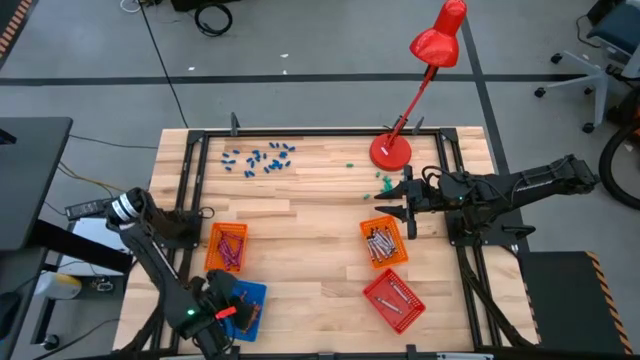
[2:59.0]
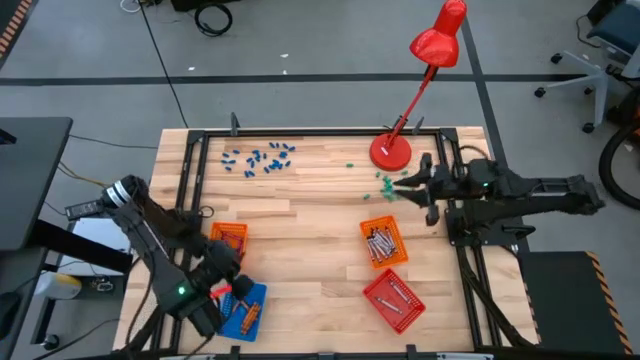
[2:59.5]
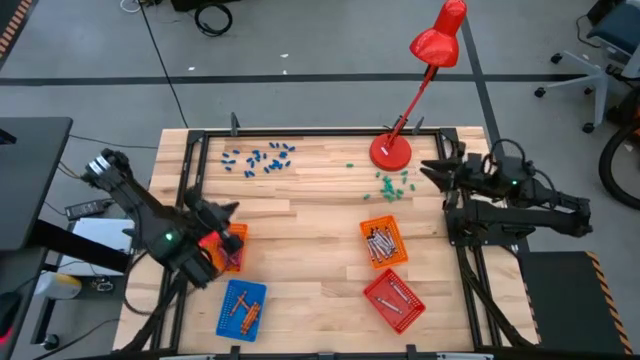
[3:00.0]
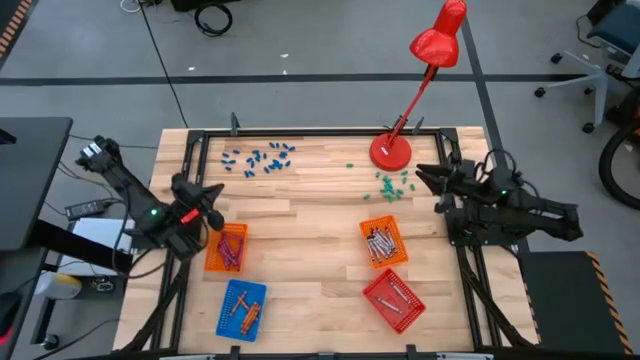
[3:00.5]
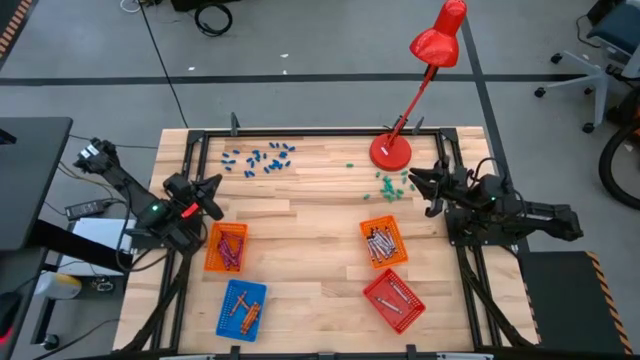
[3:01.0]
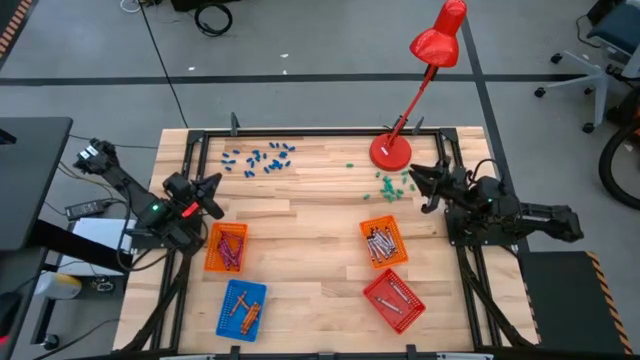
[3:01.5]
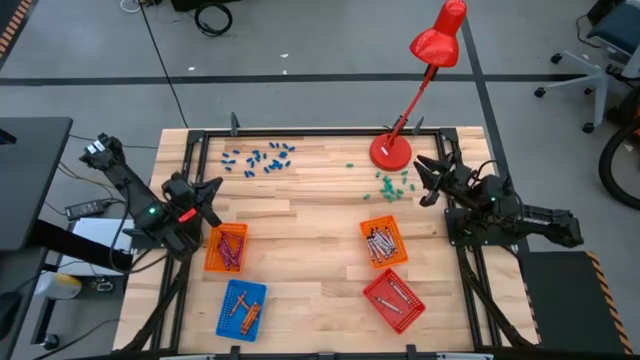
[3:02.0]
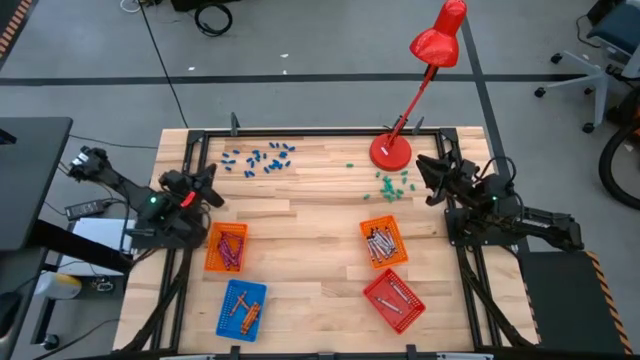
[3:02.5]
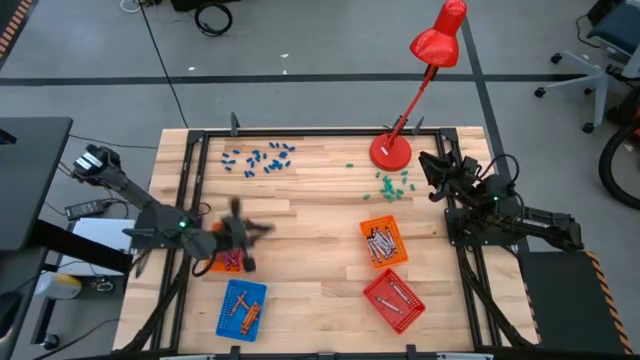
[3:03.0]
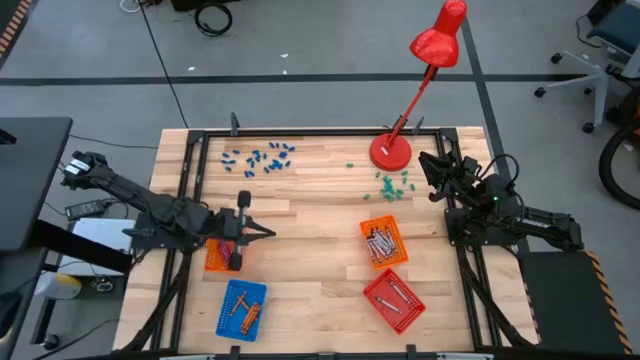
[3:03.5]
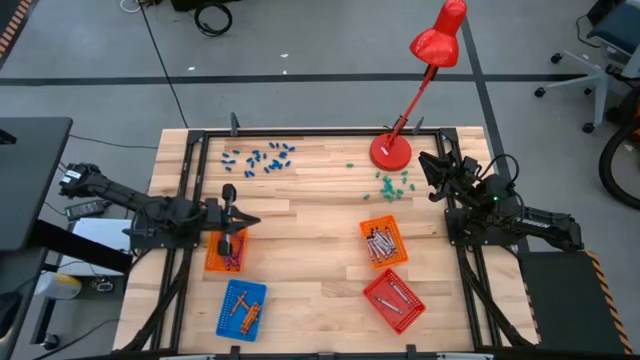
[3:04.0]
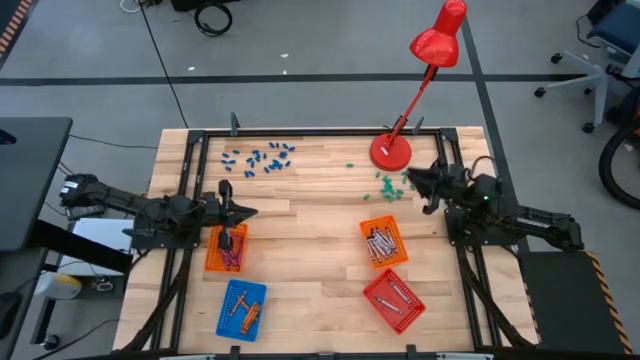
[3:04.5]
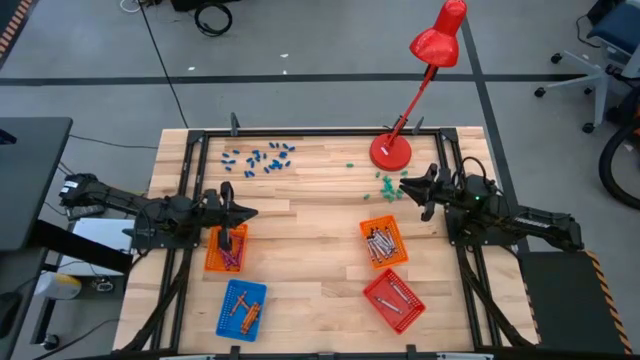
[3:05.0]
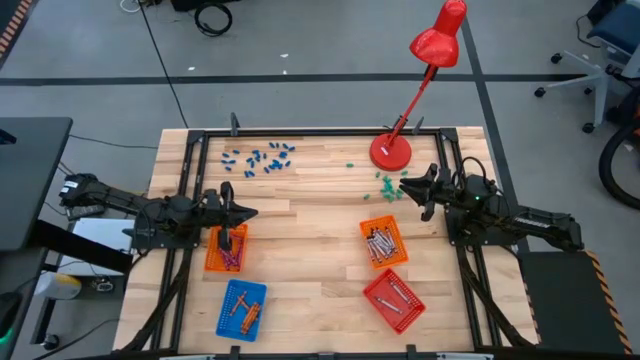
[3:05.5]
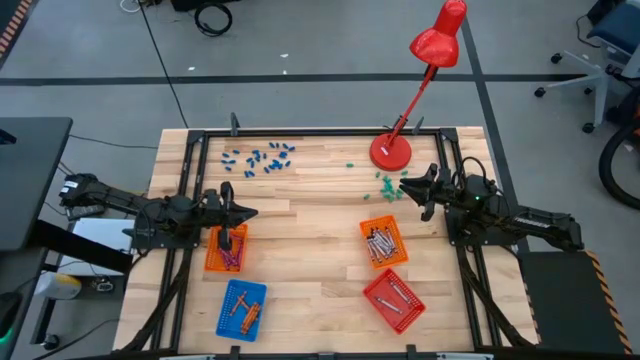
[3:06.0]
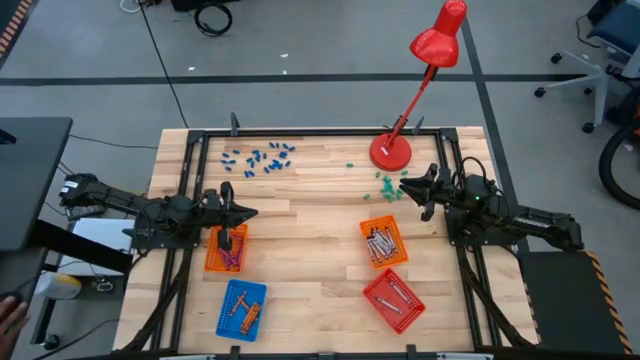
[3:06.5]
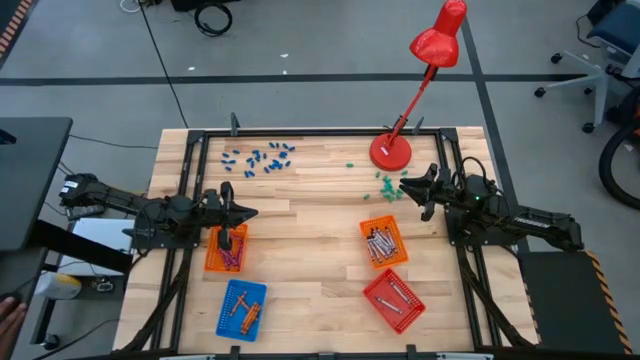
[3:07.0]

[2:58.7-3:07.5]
Task: Sort crayons
Return to Home Position

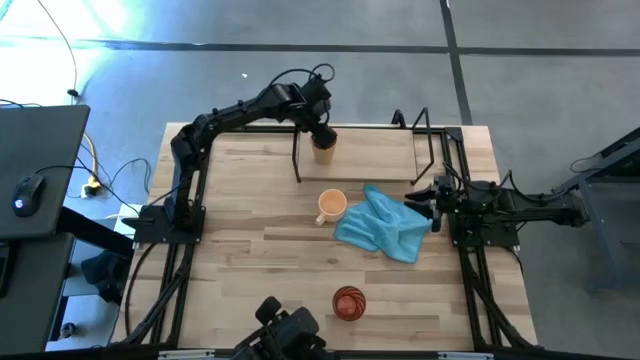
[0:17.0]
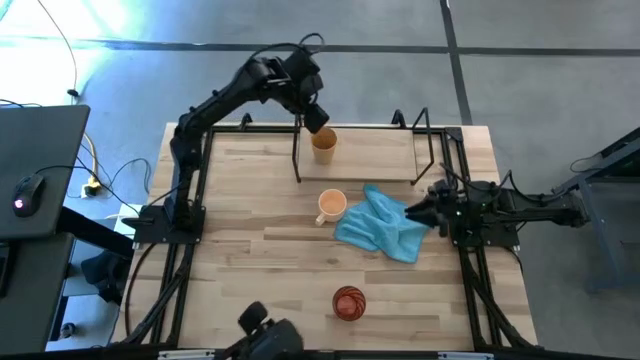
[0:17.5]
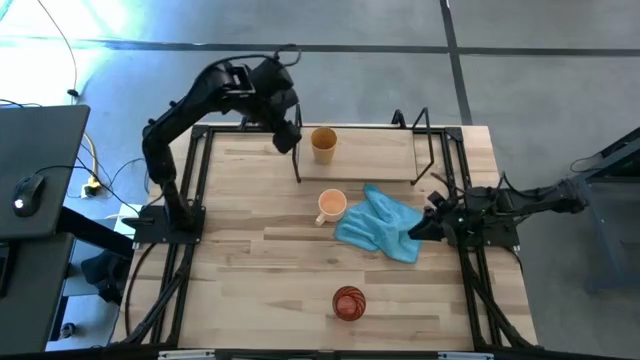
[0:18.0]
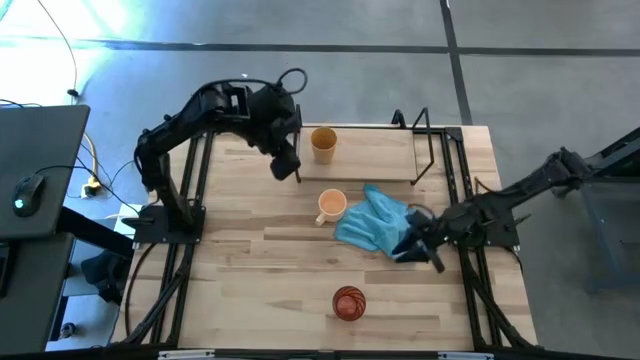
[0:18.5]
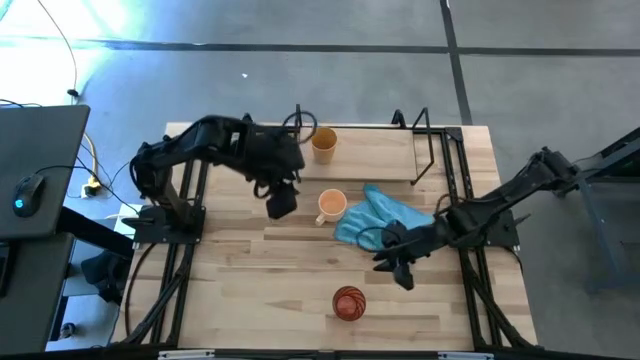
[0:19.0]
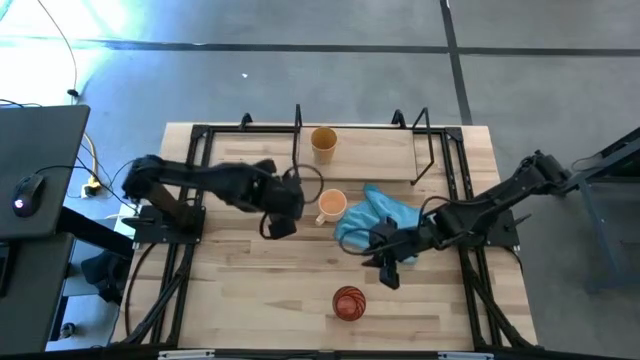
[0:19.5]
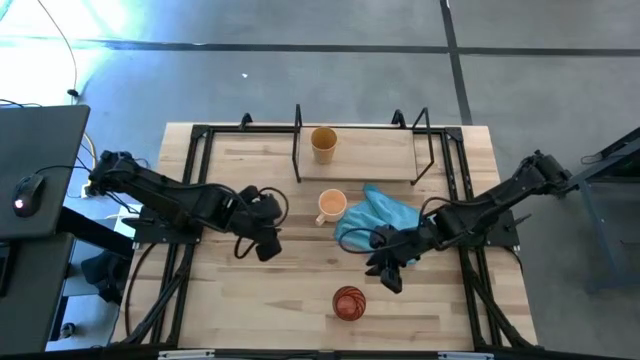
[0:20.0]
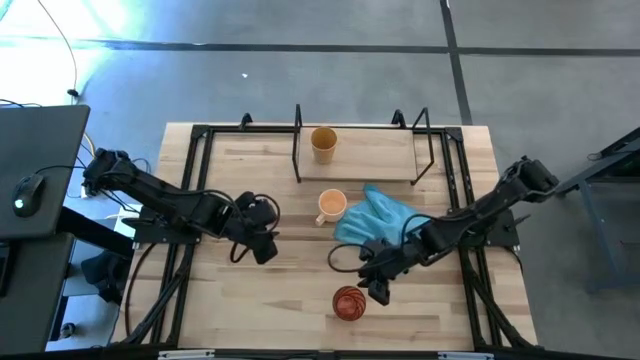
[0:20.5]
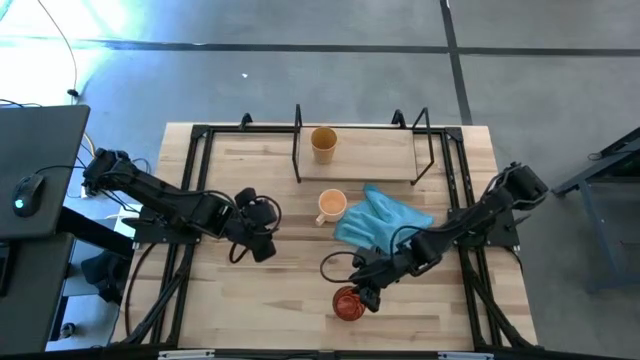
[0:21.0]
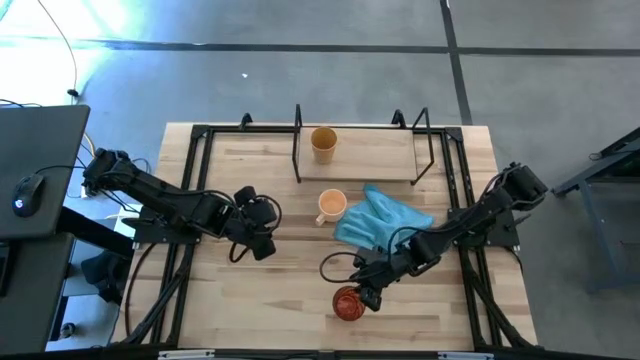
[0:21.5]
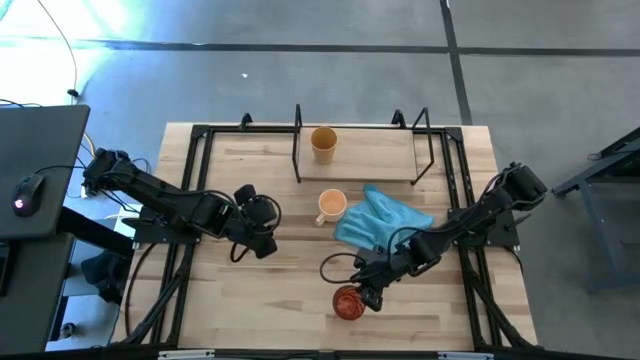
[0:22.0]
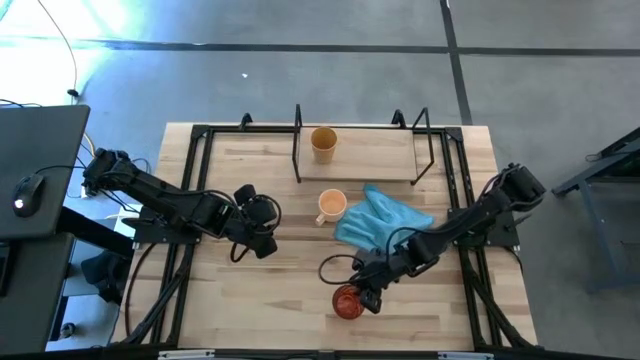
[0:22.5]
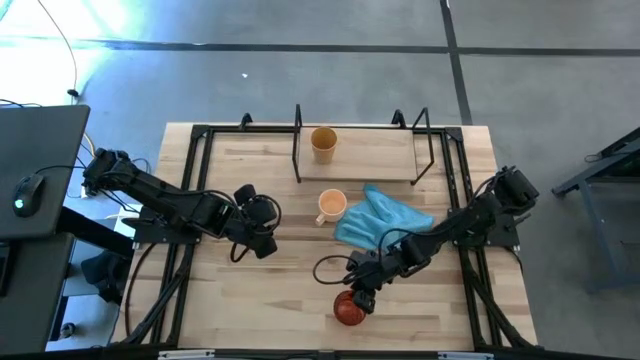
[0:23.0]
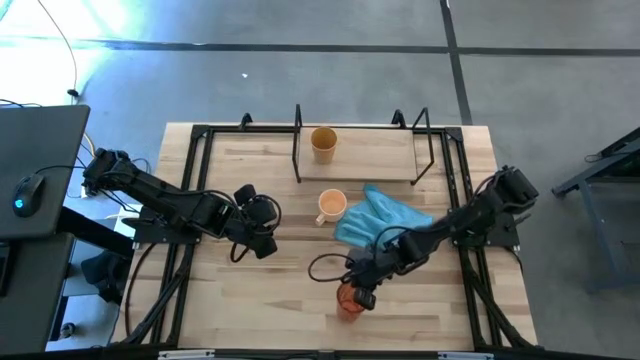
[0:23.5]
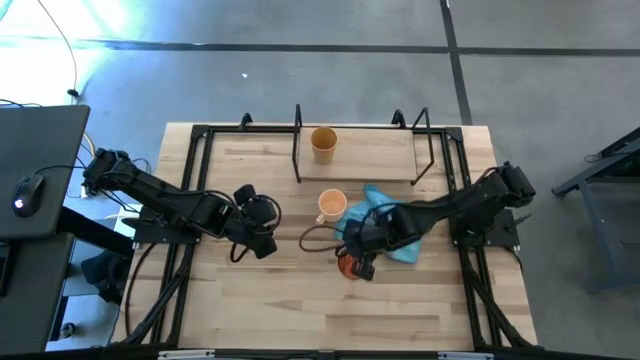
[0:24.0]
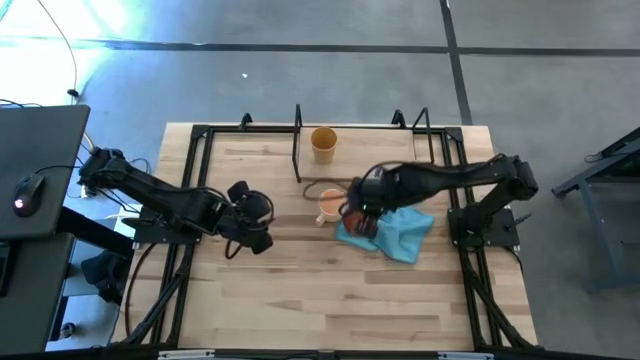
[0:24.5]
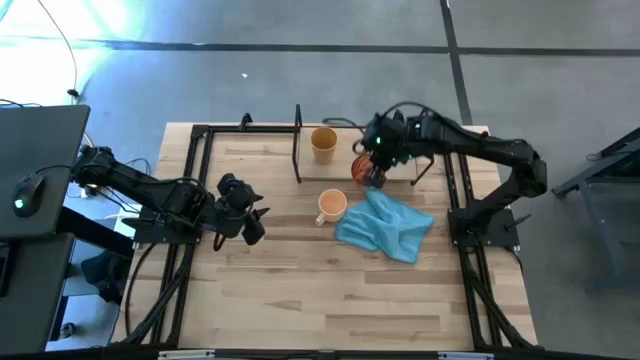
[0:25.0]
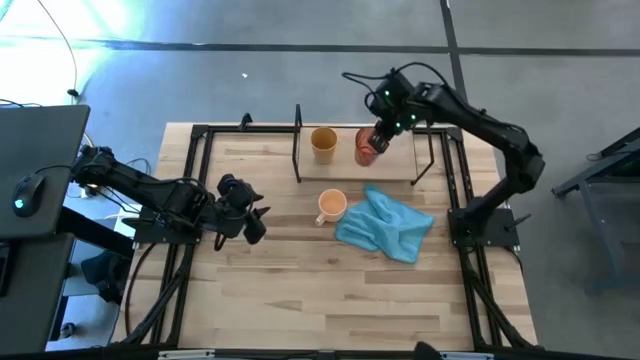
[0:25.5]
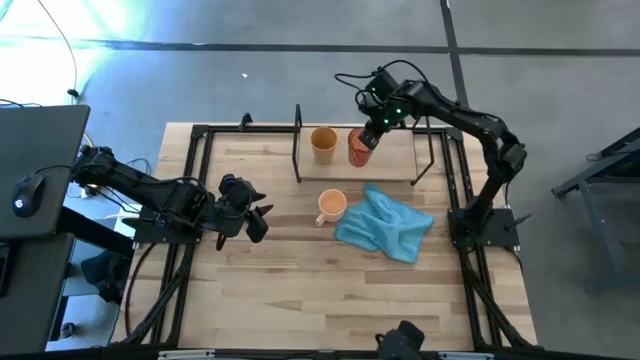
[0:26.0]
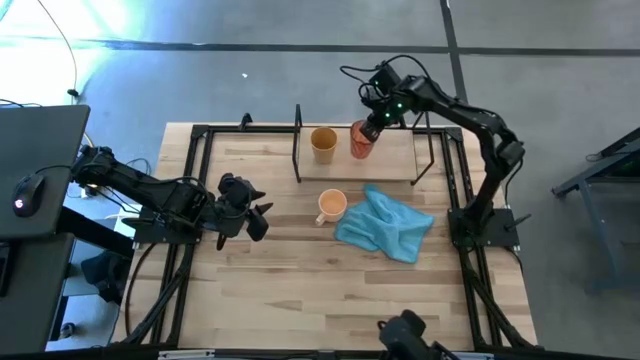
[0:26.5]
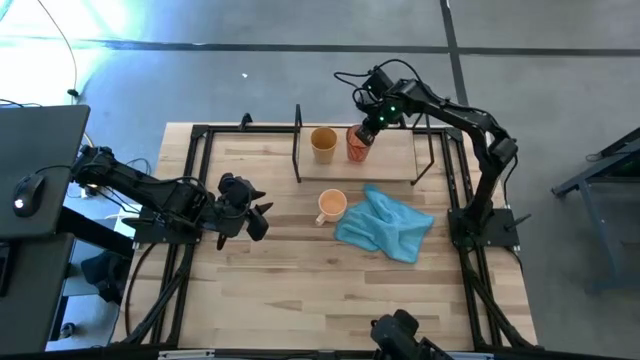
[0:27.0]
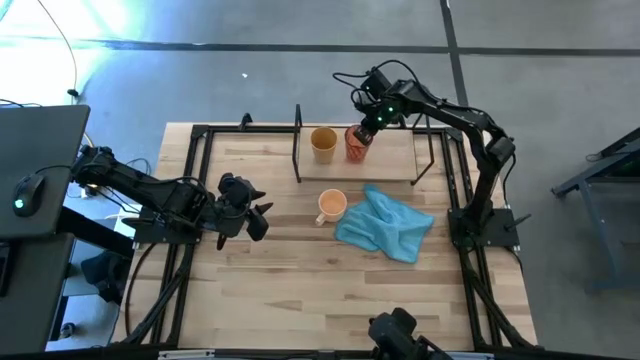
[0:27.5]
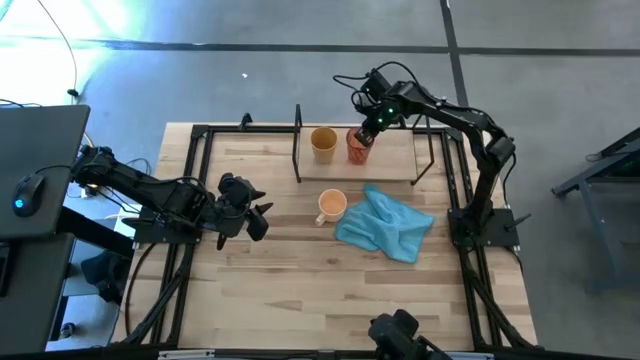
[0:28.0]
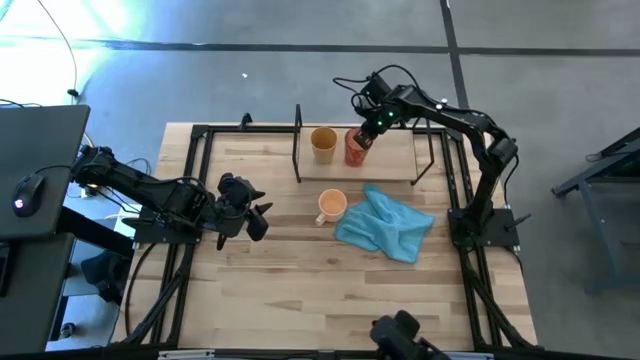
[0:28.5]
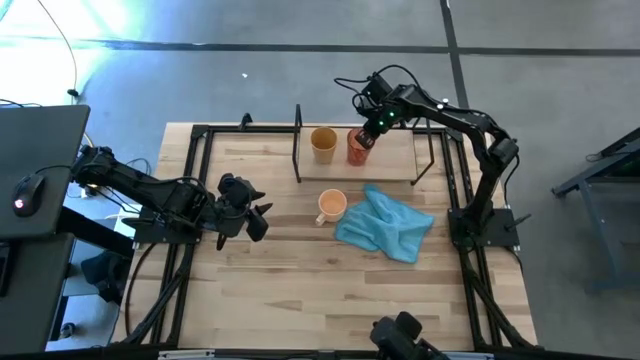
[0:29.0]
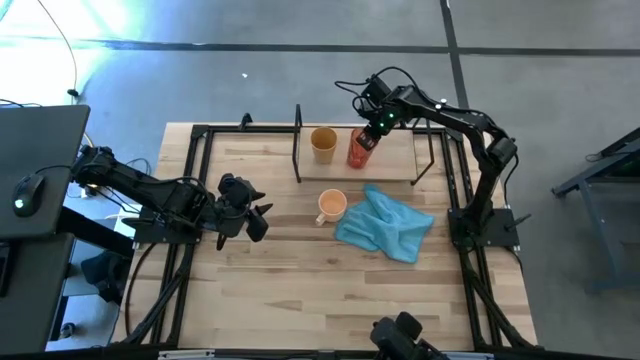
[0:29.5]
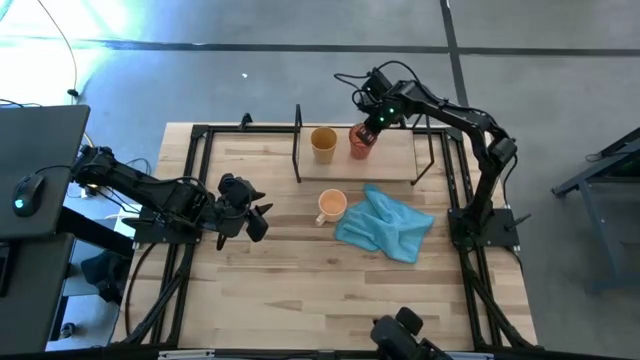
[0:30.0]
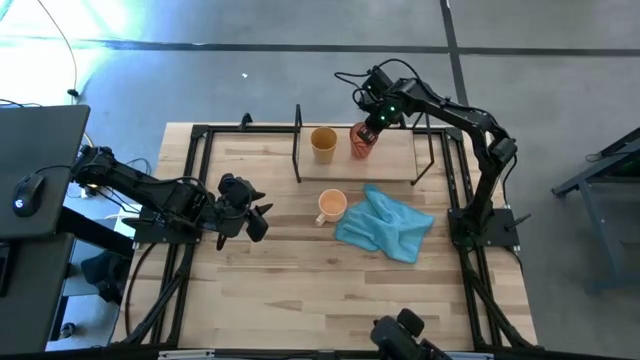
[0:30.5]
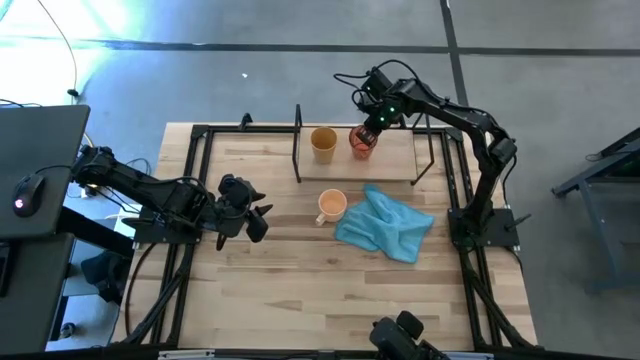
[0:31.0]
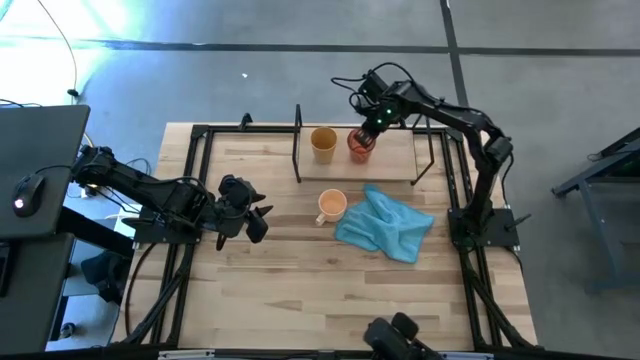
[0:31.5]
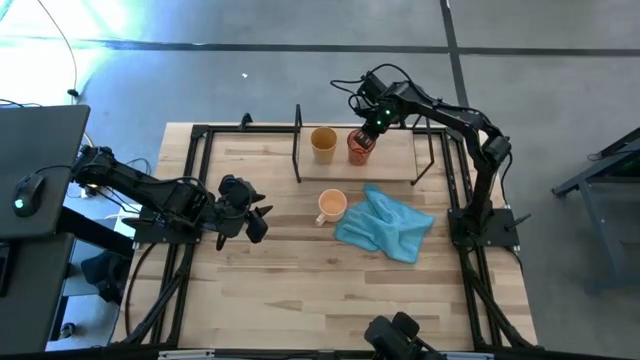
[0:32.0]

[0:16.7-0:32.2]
Task: Stack small to large cups/mugs on shelf
Put the orange cup on the shelf
